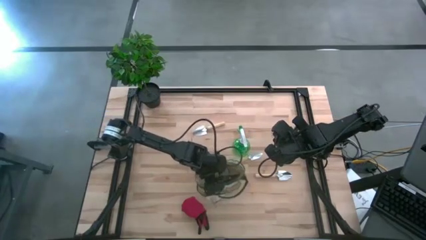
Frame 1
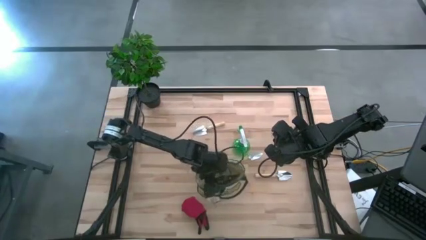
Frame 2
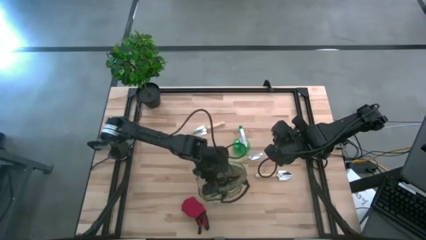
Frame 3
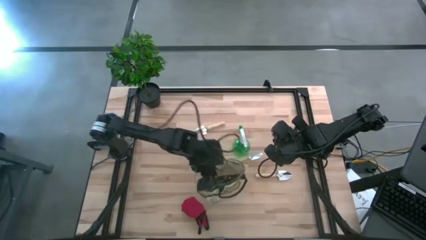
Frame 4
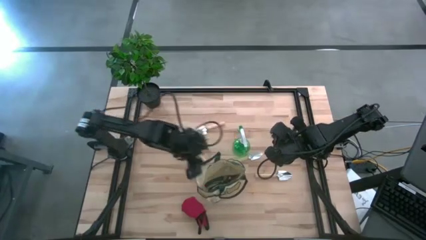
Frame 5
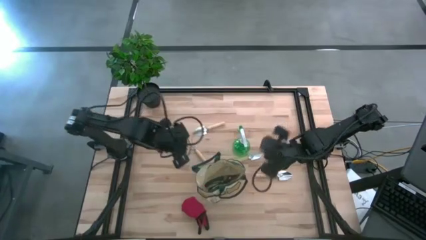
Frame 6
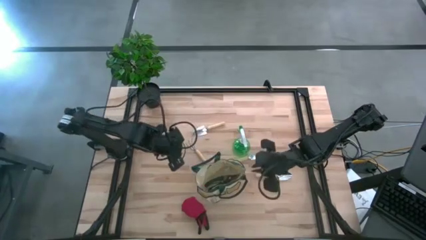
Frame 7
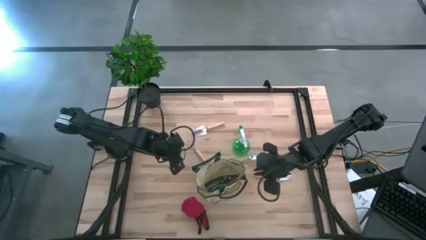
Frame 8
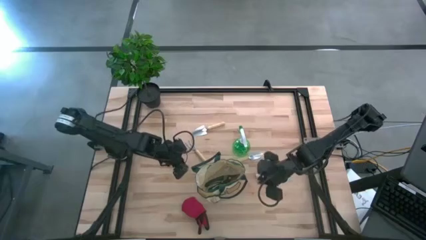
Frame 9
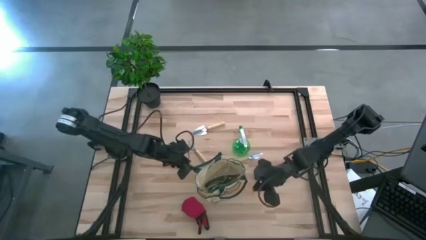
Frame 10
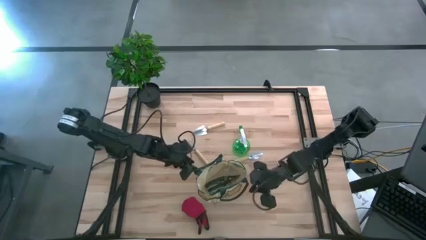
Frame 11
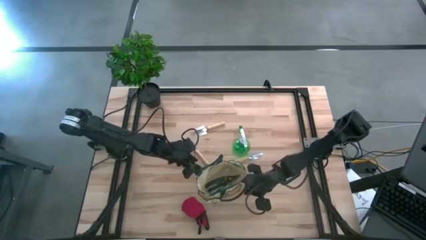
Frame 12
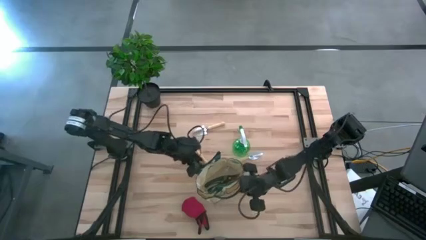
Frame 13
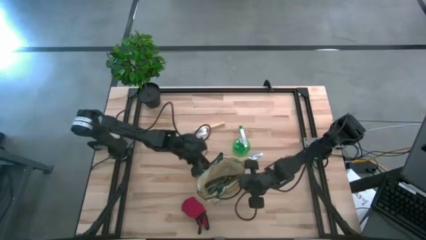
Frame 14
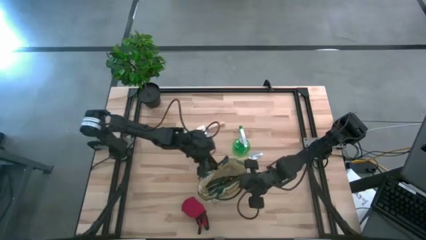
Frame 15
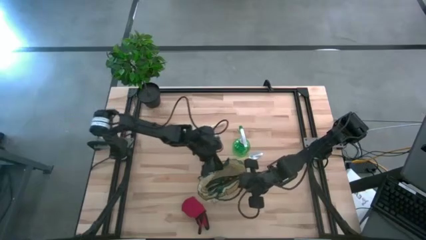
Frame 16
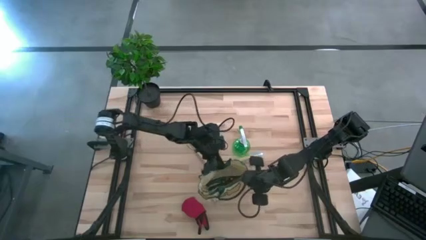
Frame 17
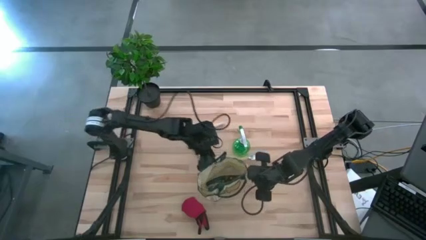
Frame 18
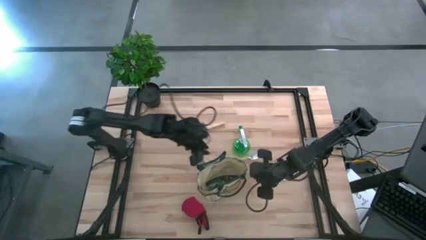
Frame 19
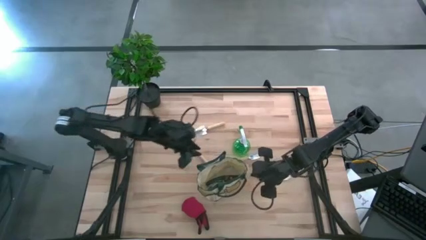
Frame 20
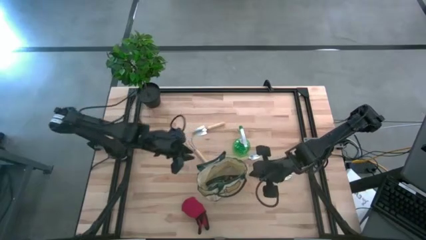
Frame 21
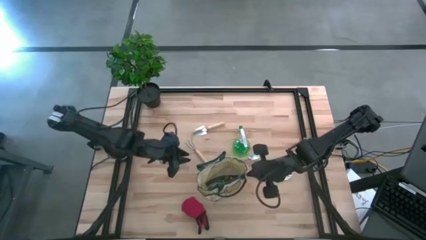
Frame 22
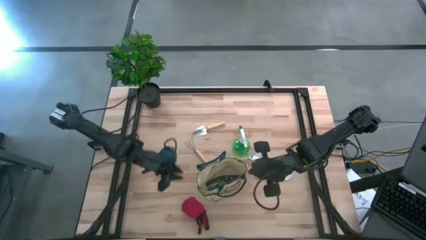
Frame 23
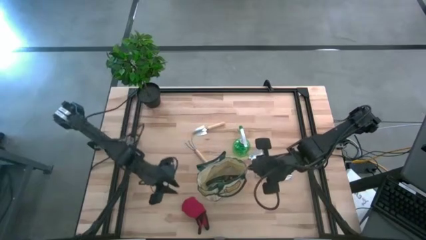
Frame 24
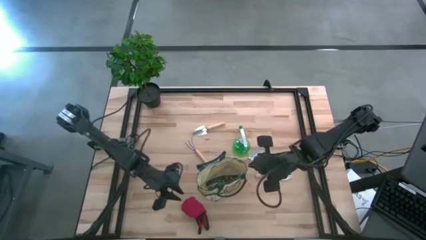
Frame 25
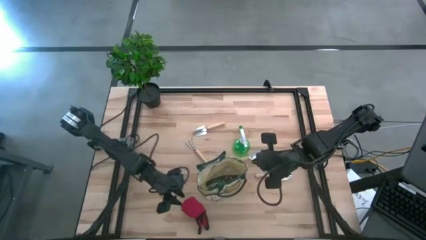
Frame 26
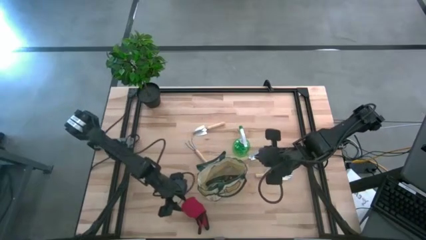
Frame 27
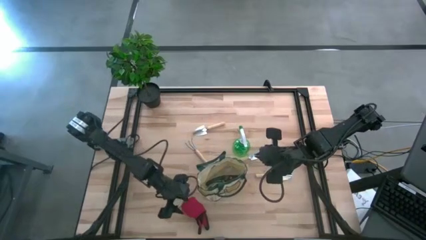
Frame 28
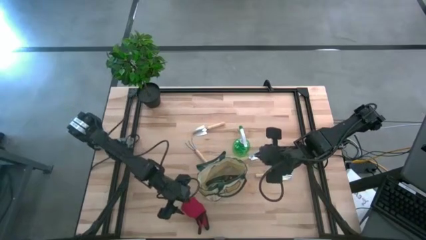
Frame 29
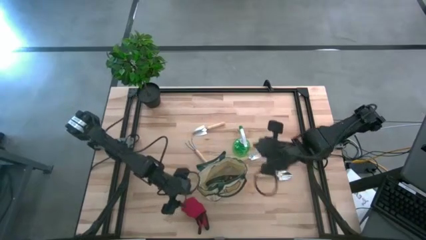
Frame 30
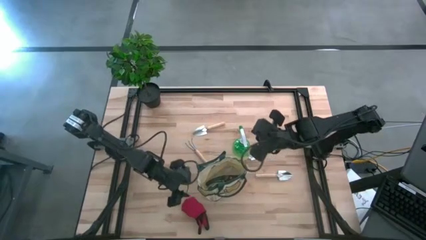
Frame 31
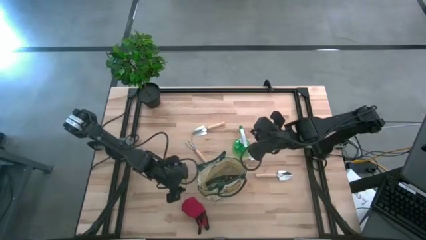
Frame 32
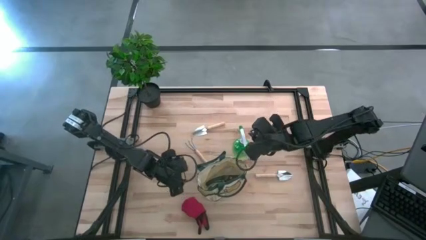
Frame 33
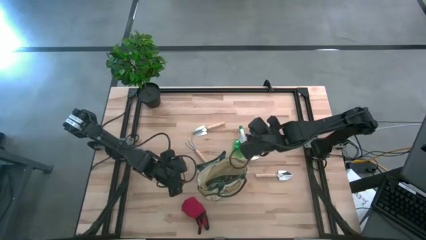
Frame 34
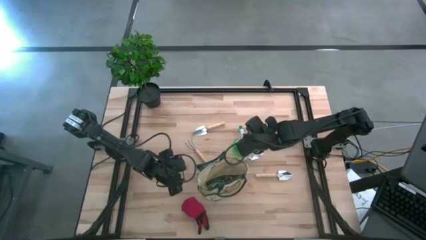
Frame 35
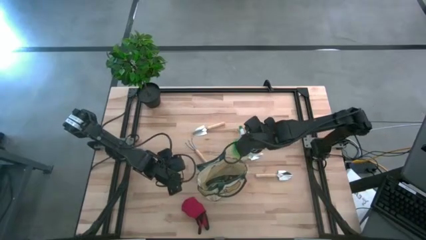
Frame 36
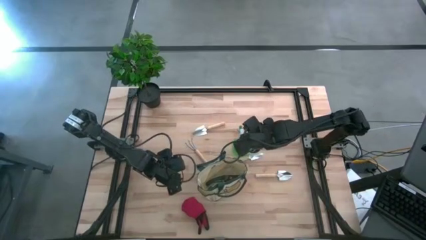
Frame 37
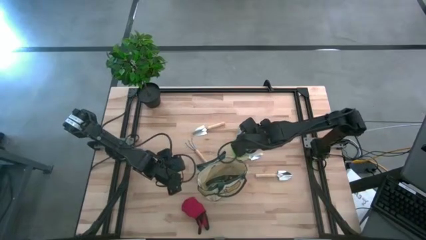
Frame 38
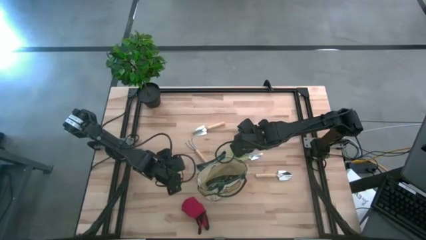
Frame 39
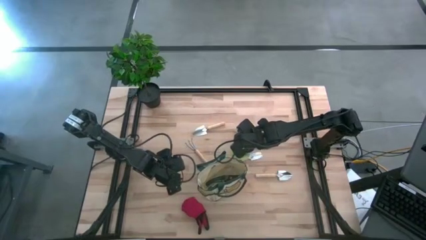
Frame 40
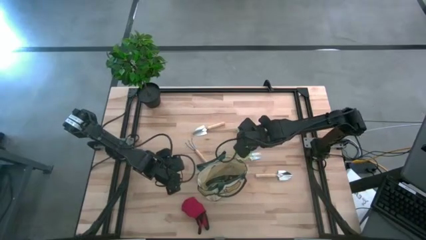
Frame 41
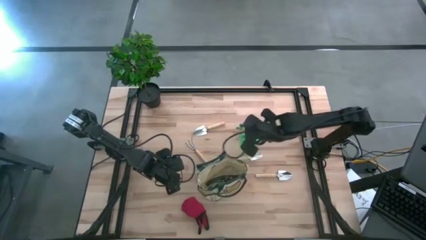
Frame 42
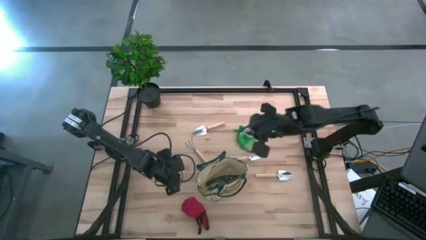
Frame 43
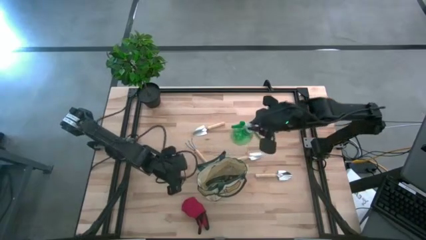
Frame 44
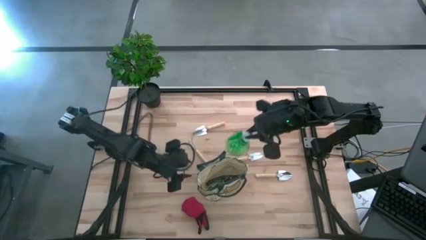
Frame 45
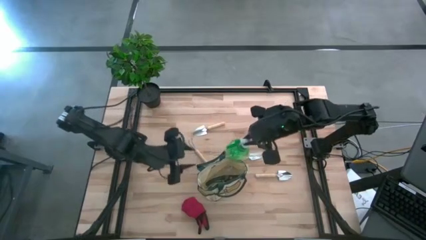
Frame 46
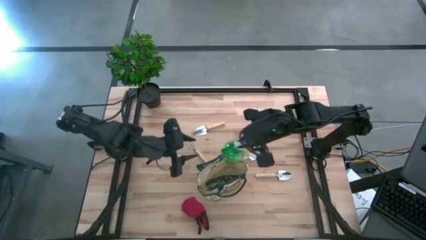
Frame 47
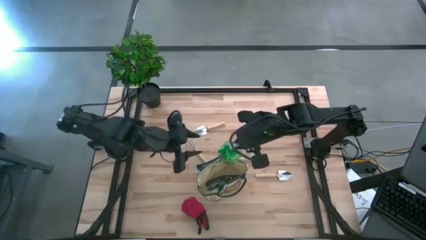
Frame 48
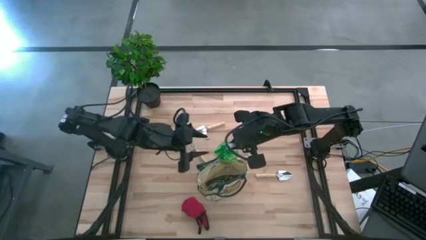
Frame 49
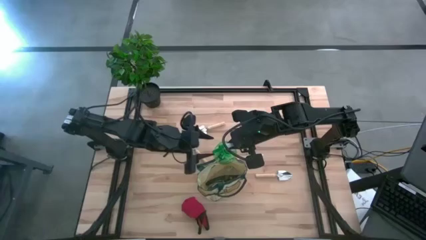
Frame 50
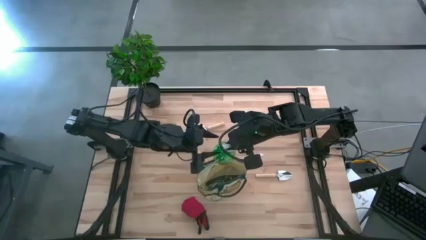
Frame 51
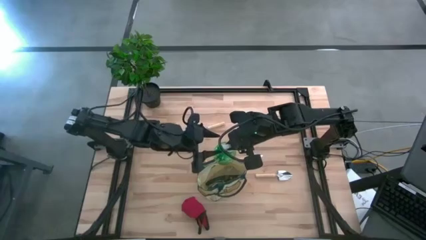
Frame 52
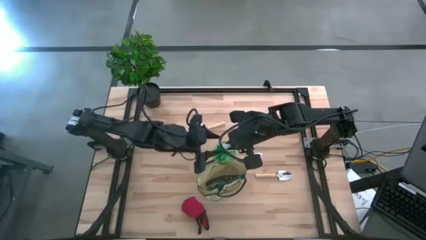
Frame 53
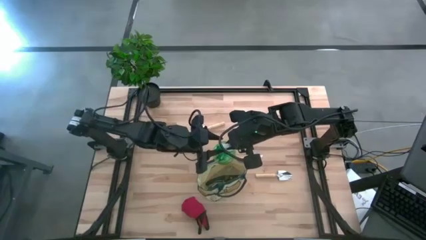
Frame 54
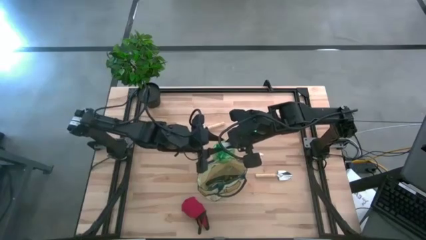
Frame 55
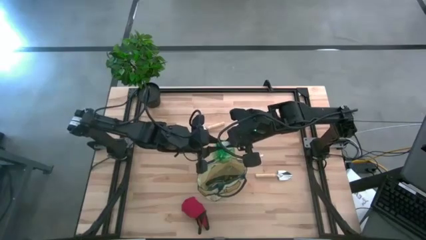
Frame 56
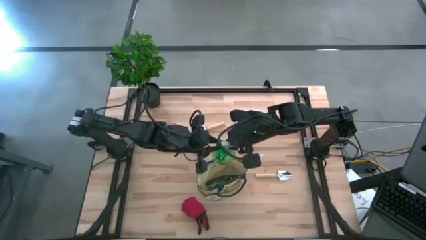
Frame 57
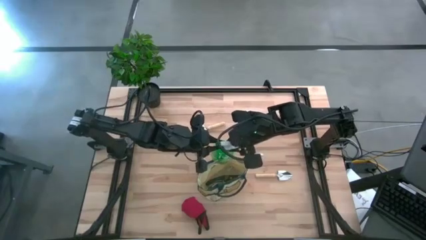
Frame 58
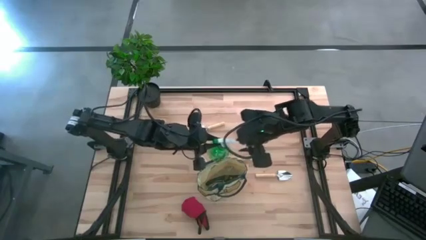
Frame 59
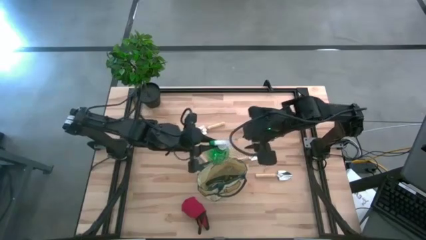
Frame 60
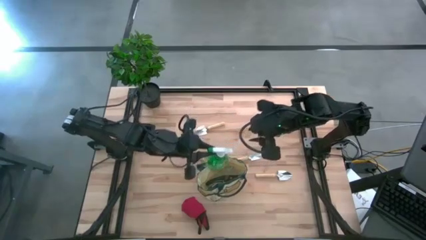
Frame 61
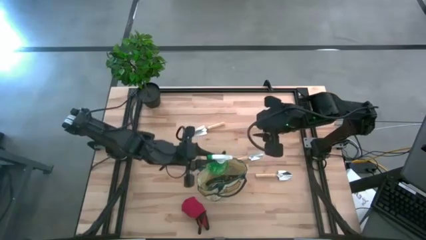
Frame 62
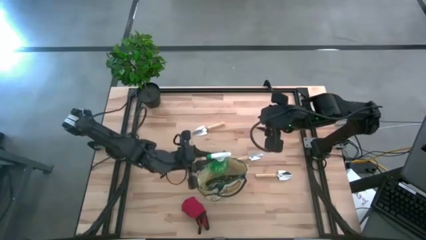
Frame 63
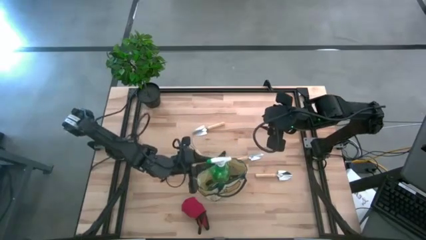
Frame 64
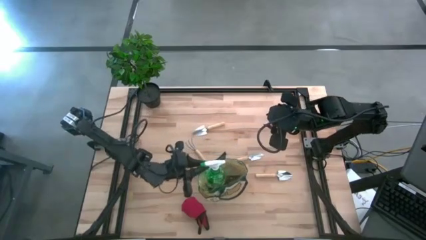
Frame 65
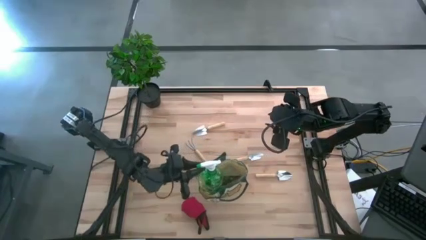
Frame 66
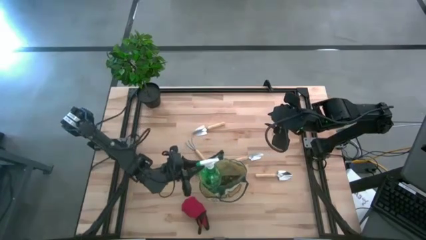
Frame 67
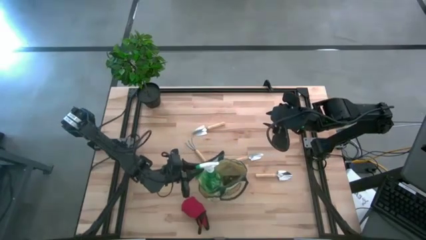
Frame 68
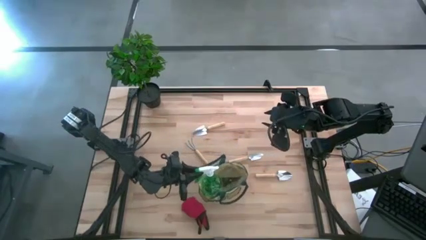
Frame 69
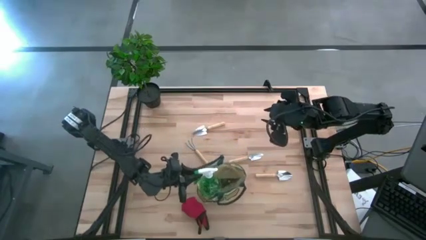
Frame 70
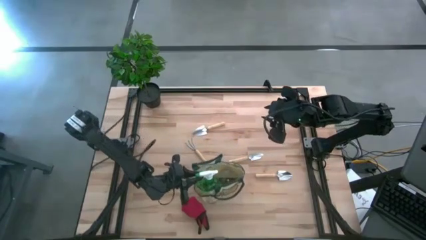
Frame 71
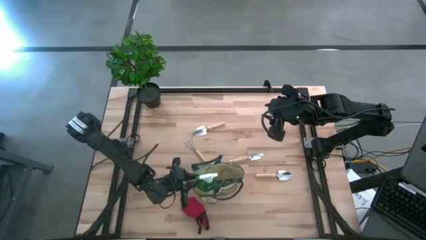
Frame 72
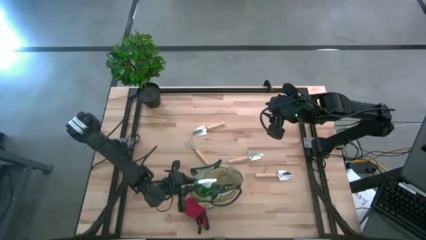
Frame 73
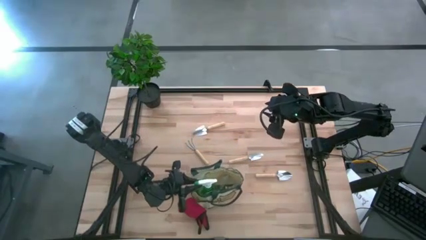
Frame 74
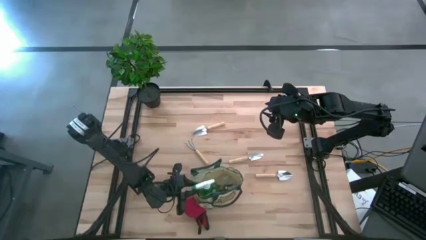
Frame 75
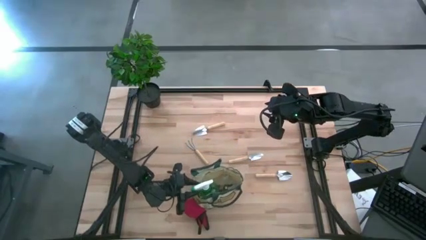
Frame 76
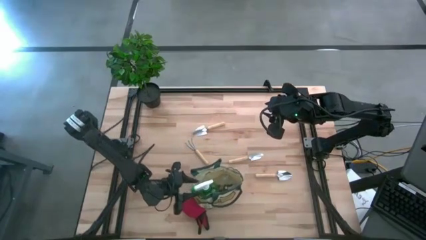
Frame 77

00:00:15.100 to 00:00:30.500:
Task: Pick & Place Garden tools in Gardening bag
Put the garden sprayer into the gardening bag

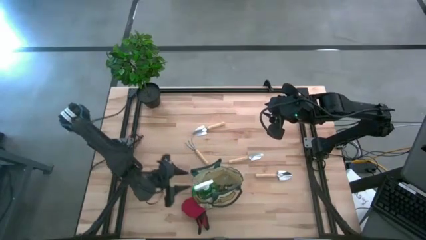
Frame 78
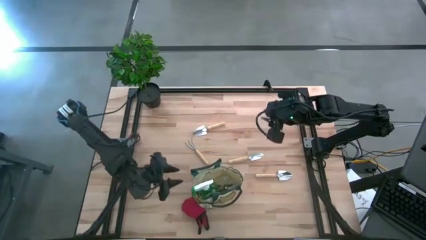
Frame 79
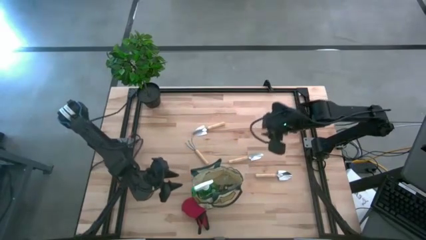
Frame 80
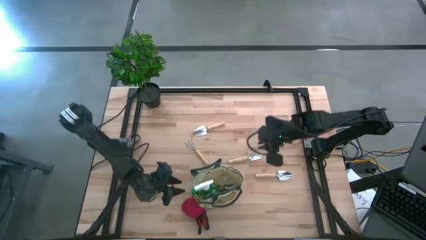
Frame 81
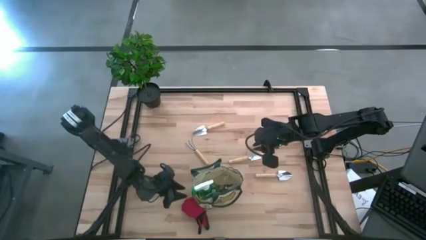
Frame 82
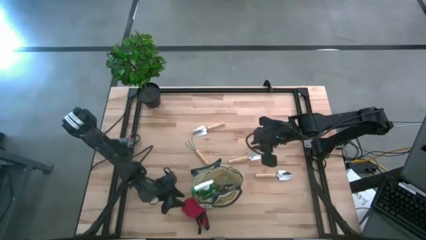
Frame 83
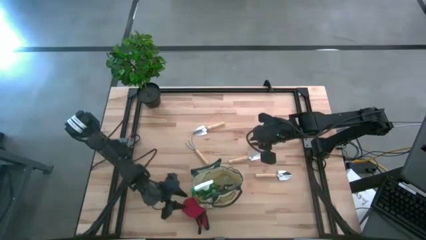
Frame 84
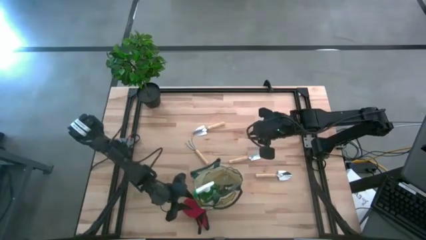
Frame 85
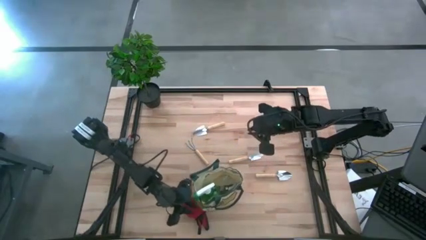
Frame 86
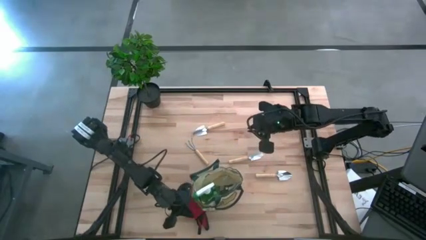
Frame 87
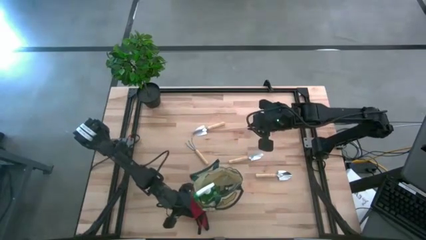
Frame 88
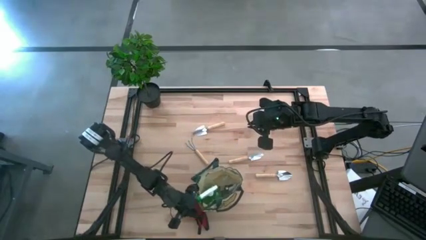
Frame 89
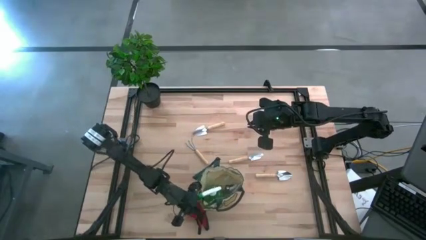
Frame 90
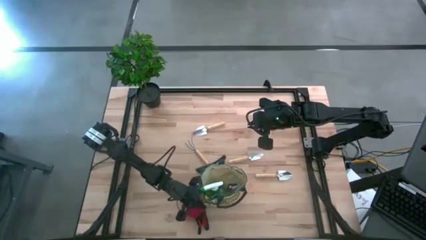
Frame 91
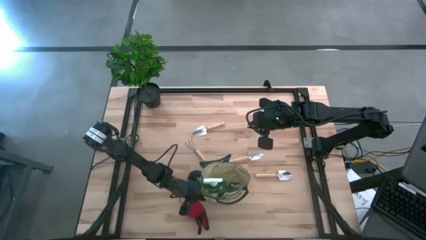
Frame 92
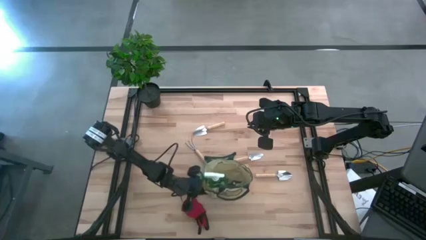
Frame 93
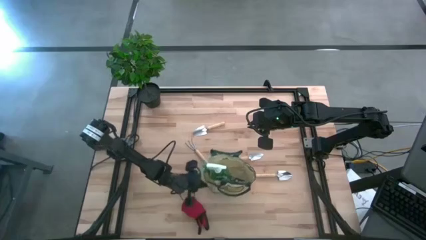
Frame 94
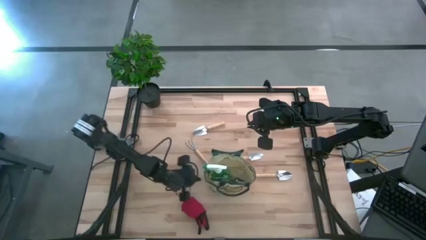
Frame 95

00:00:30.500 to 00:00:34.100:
Adjust the gardening bag
